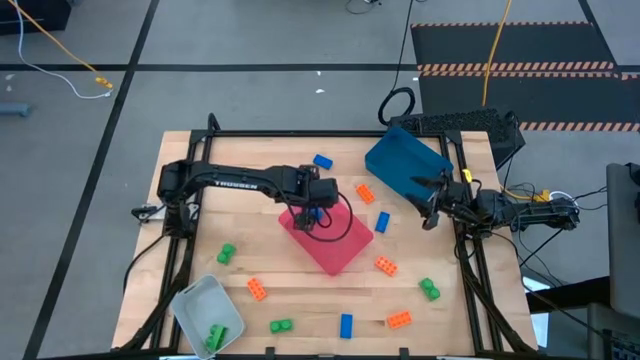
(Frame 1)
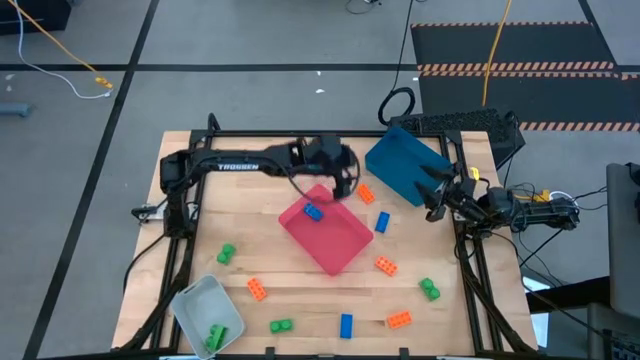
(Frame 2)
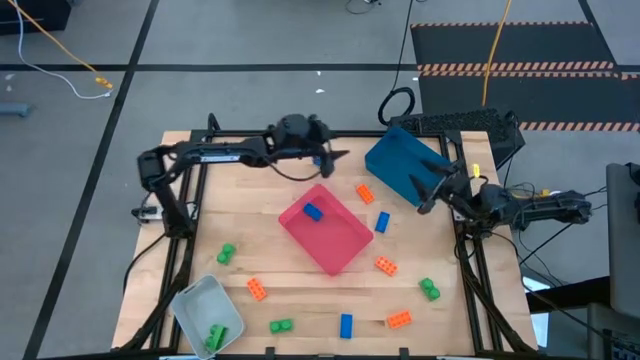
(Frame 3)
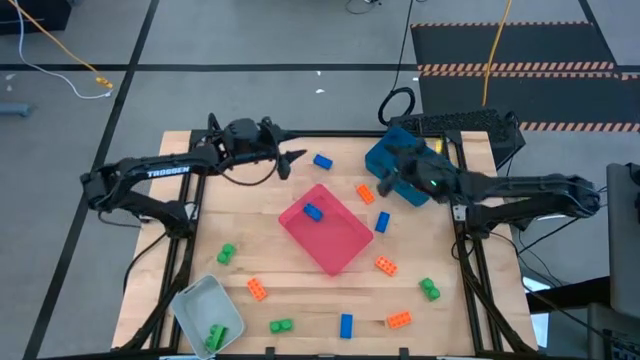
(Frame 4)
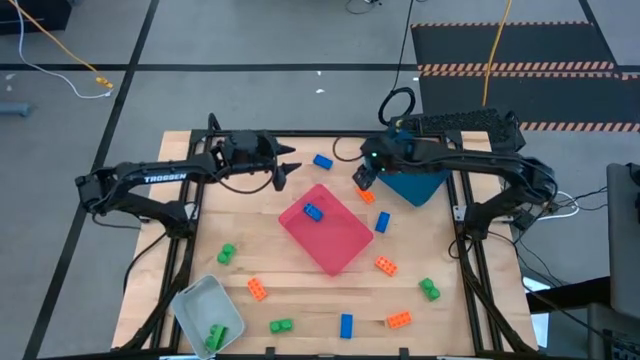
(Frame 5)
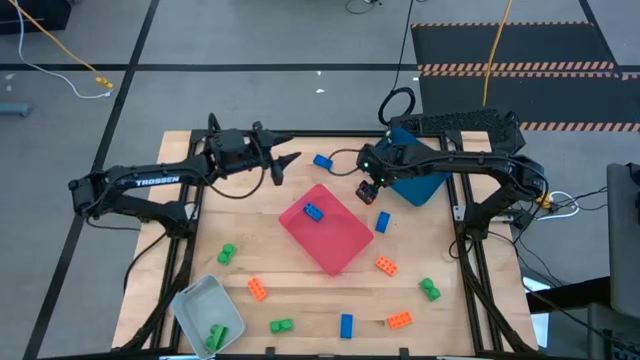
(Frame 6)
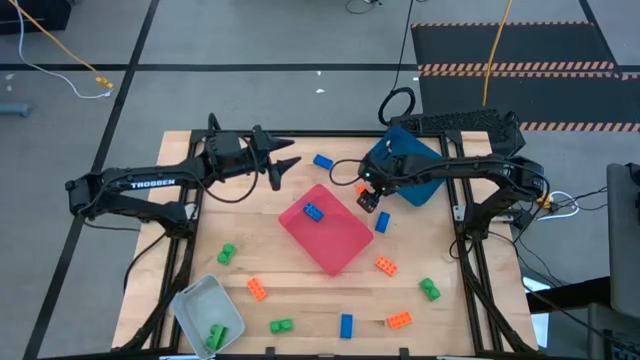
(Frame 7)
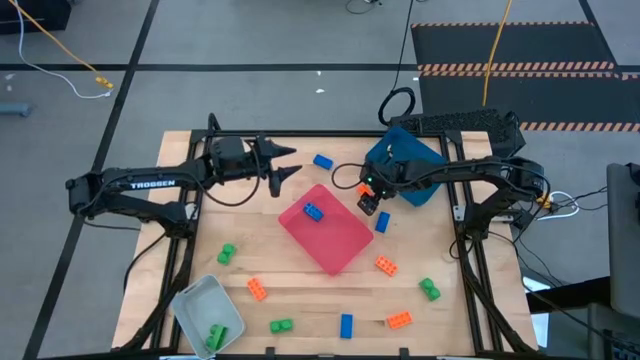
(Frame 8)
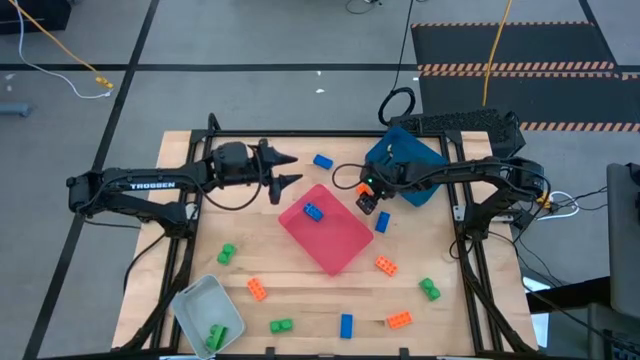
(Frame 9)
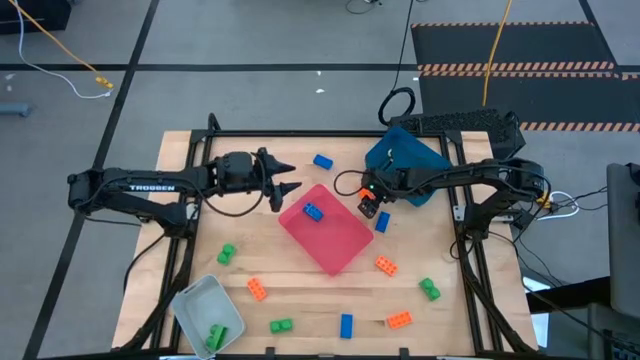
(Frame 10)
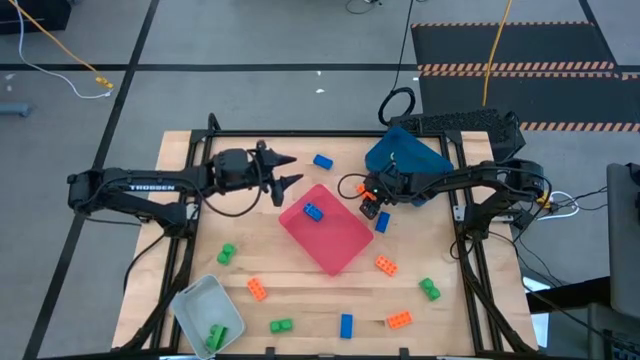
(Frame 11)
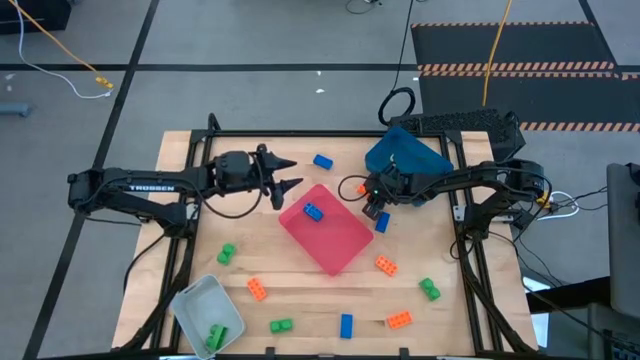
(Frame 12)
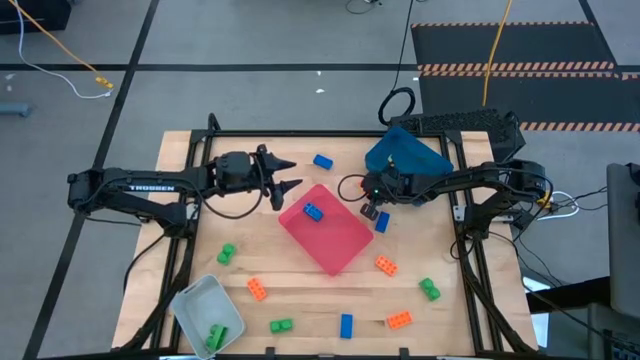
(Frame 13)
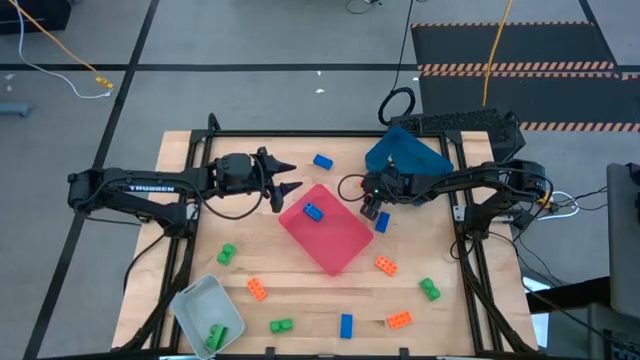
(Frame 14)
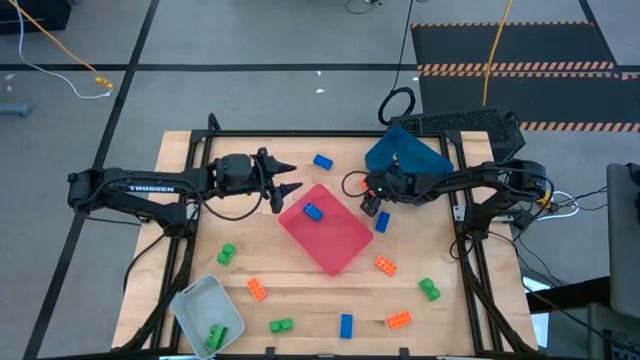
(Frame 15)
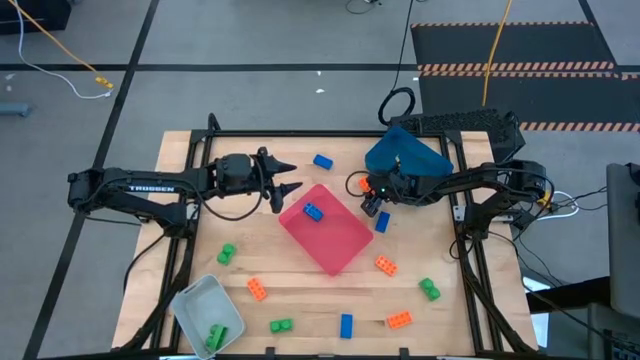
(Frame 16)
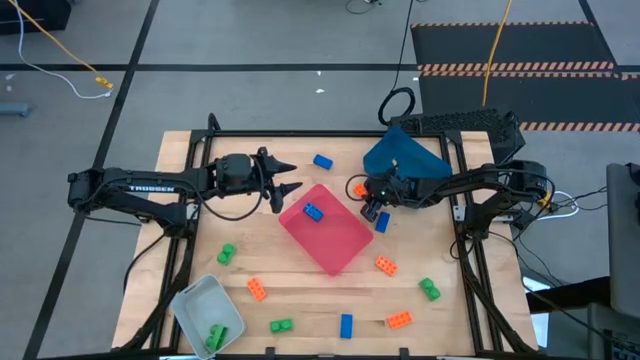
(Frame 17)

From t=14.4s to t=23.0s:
Task: Sort & place blocks by color
Put the orange game piece into the blue bin

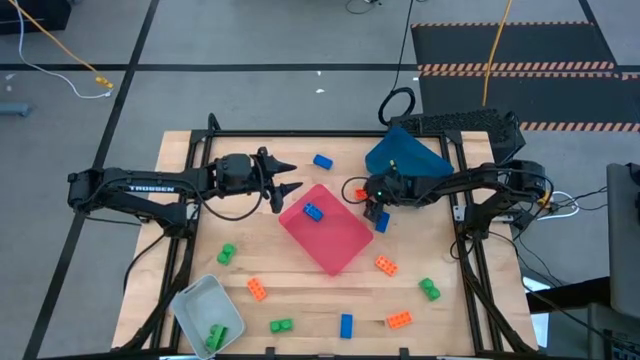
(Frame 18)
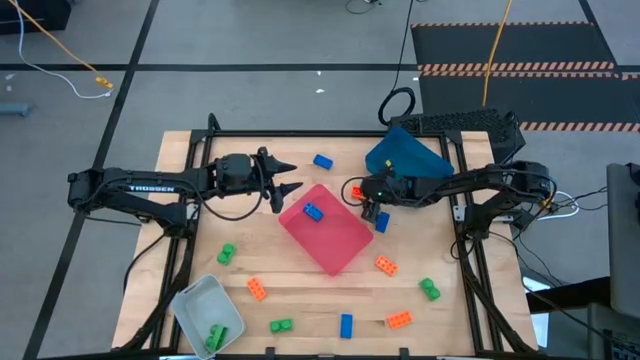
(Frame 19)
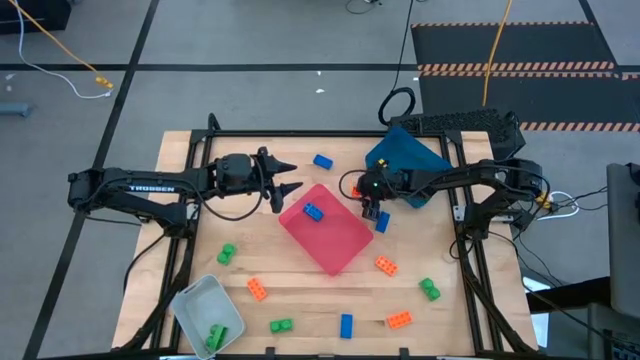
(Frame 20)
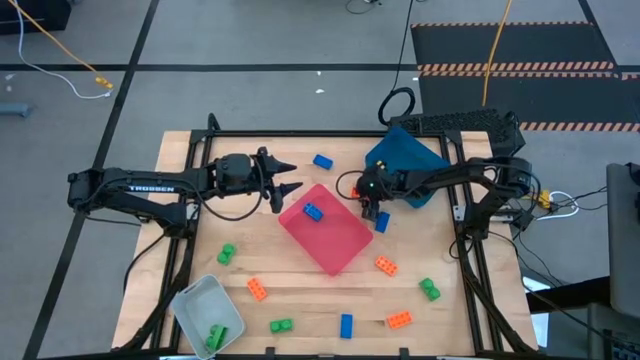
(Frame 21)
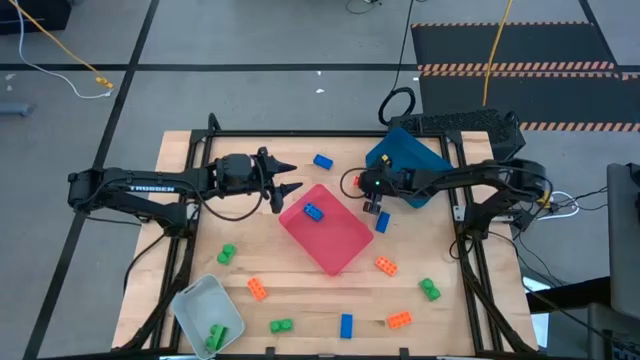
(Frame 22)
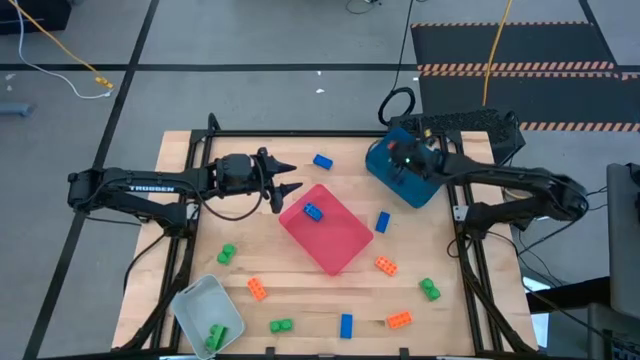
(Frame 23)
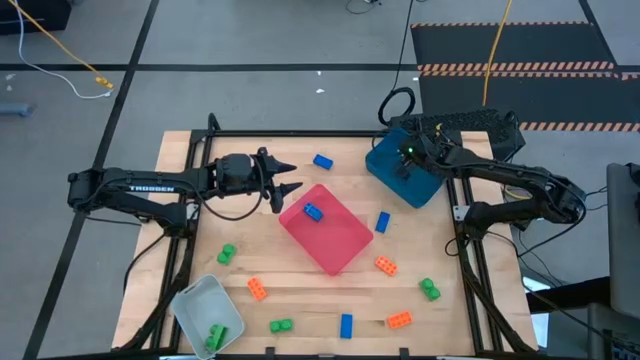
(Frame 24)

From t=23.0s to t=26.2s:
Put the orange game piece into the blue bin

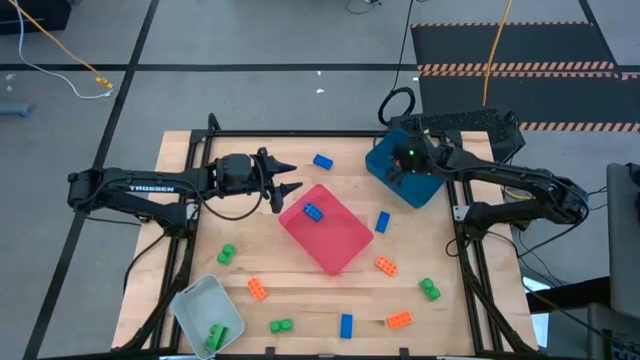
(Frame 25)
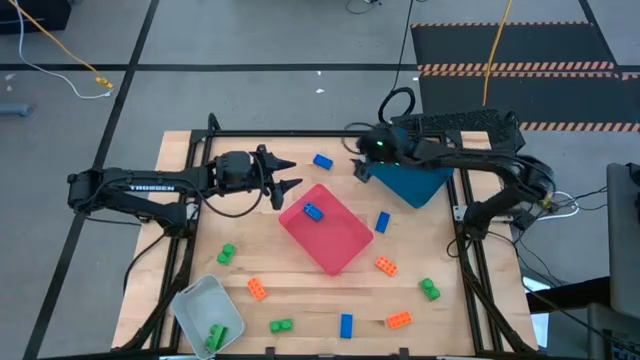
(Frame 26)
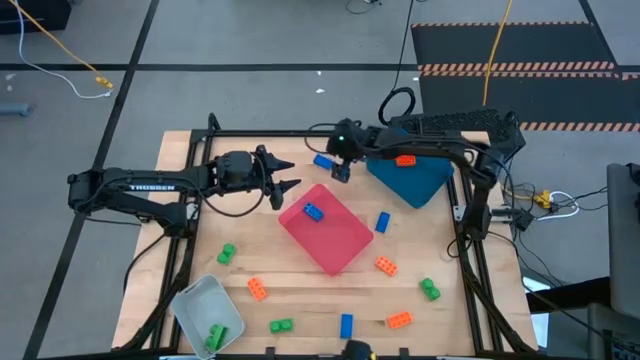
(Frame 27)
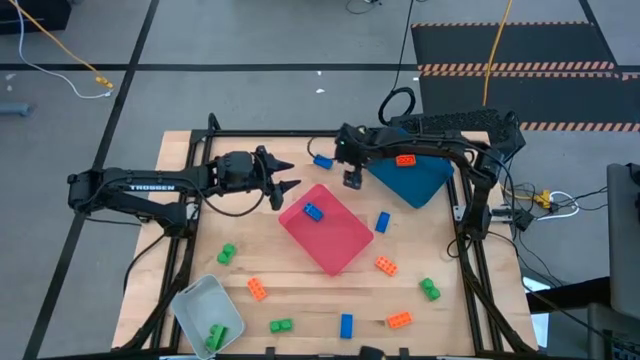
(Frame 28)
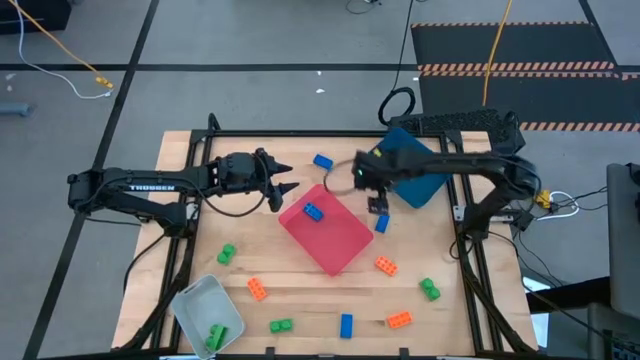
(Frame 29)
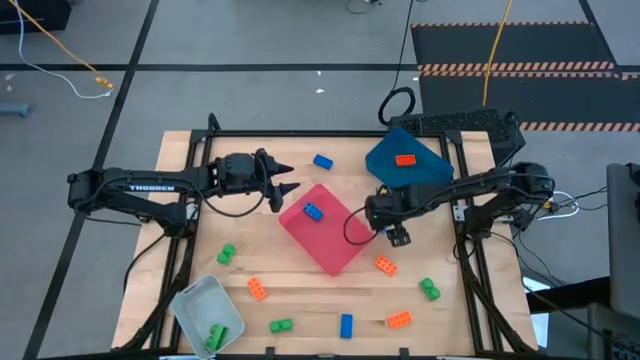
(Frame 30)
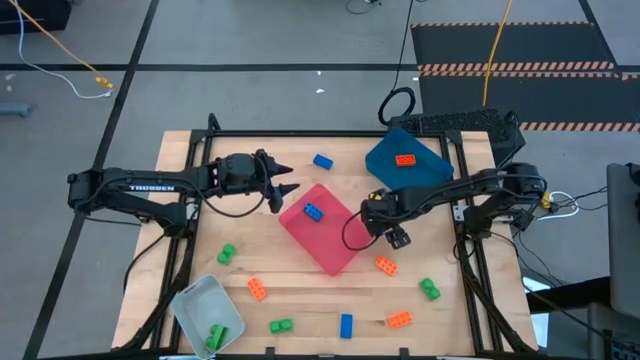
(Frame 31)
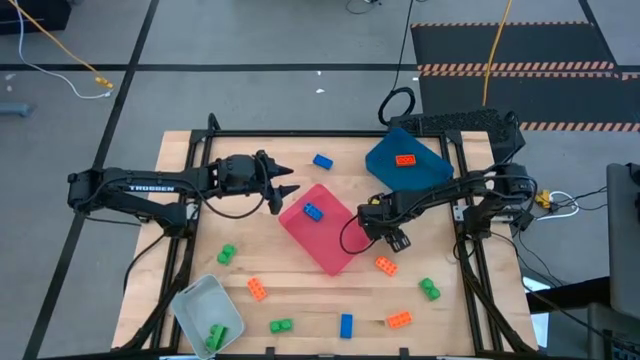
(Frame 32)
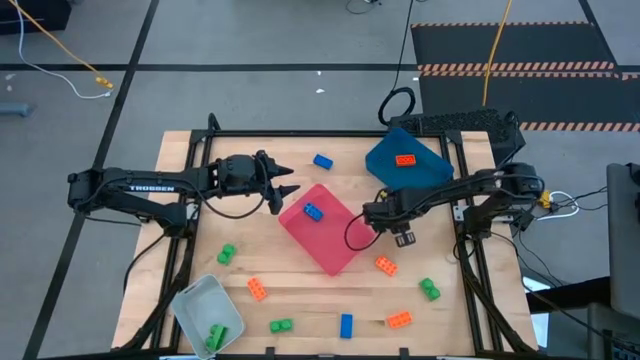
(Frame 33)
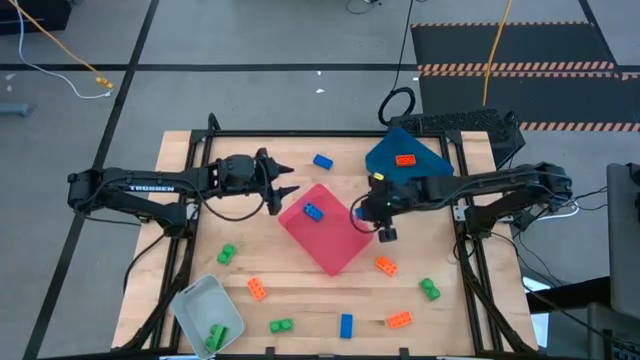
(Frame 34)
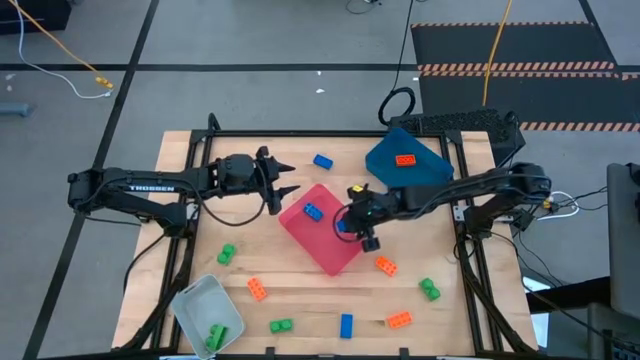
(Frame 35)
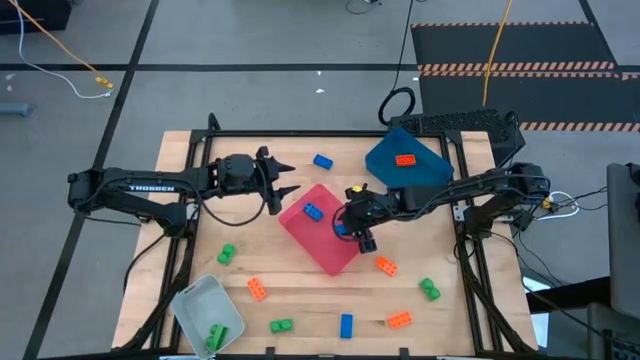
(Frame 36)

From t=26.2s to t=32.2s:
Put the blue game piece into the red bin

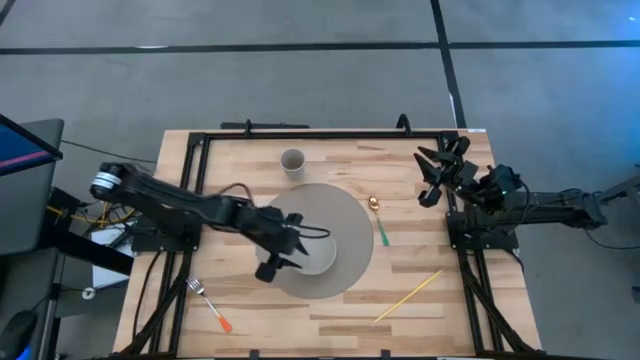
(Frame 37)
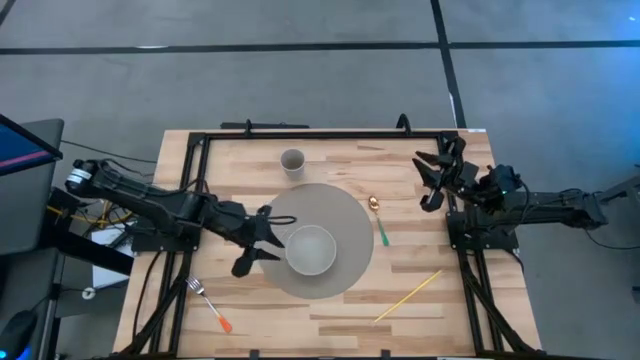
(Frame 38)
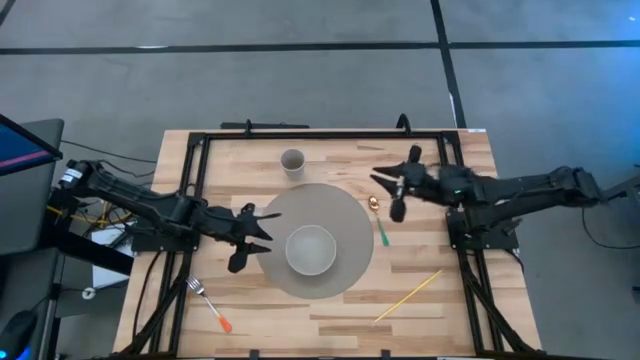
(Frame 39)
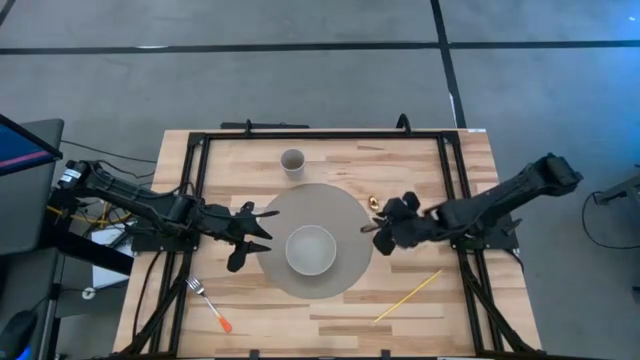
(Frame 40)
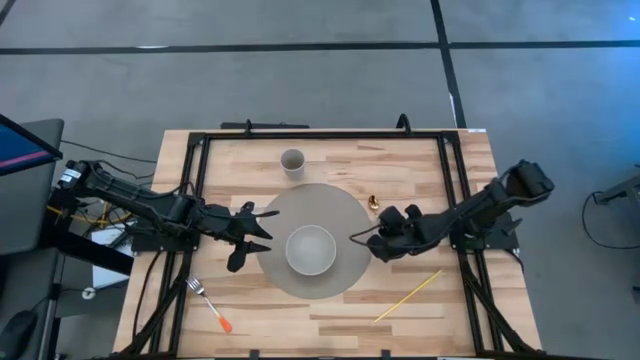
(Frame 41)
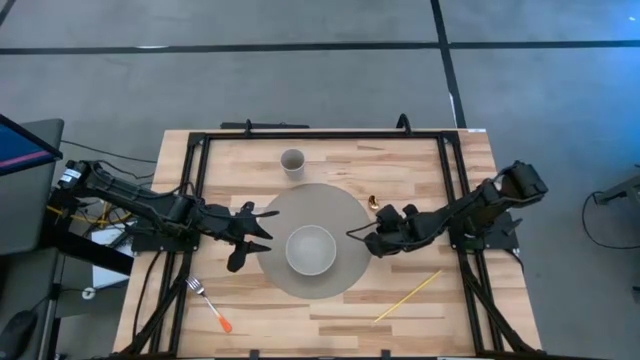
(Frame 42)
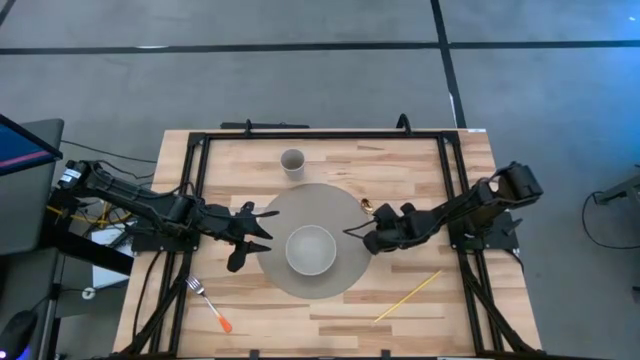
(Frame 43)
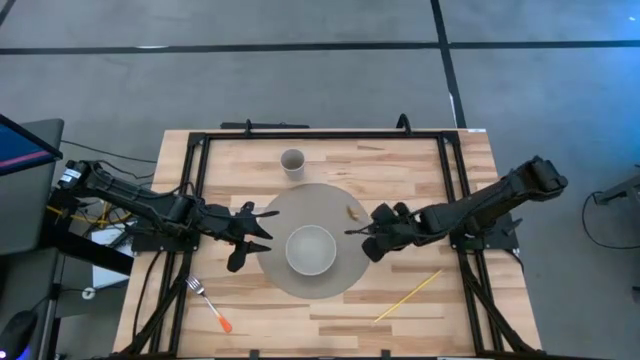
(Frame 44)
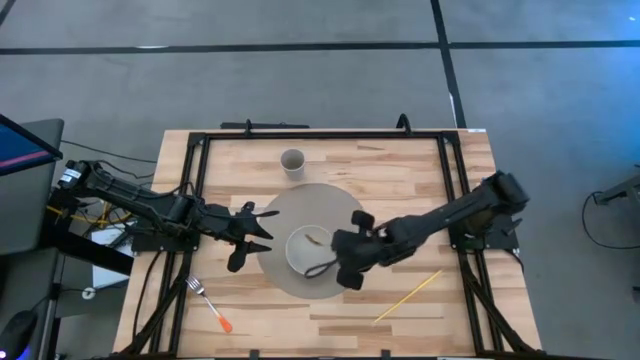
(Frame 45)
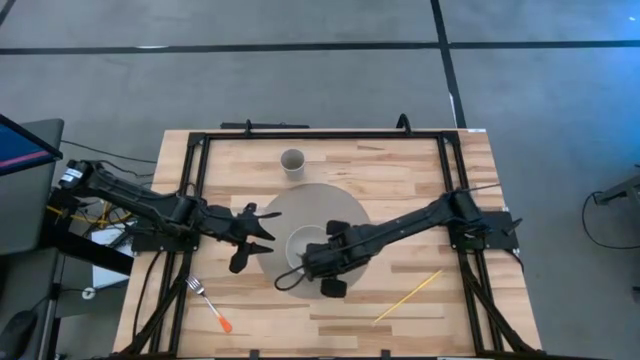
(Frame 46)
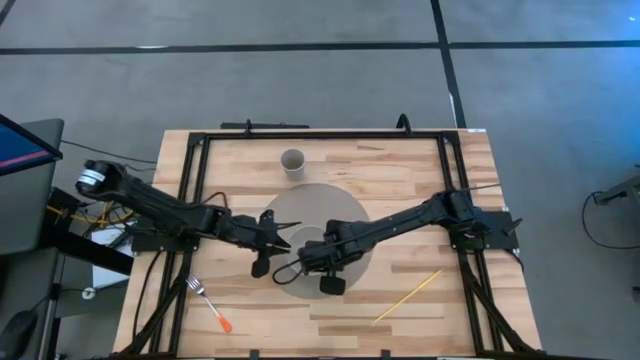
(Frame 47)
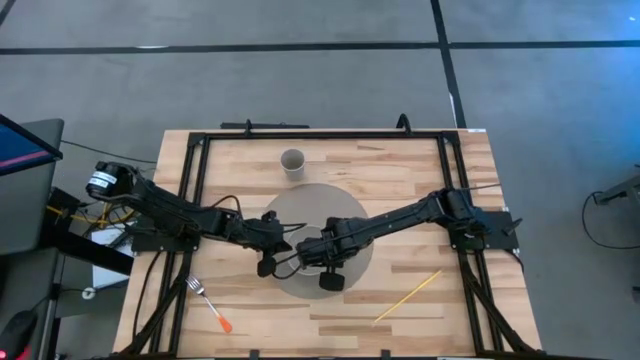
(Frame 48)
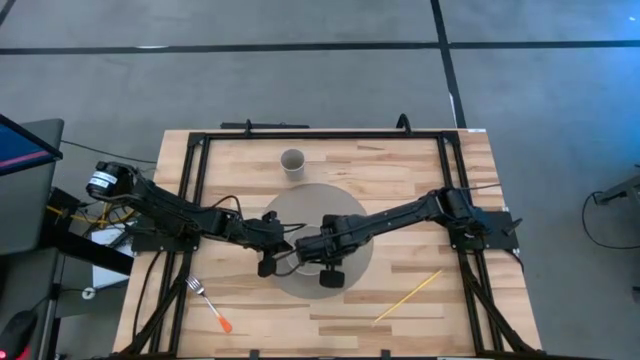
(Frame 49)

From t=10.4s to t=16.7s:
Task: Pick & Place Utensil
Put the green spoon into the gray bowl on the placemat
